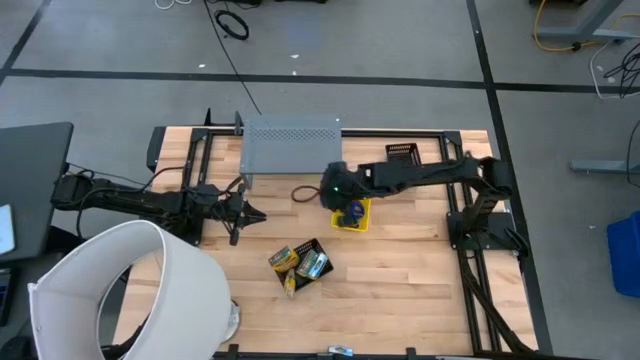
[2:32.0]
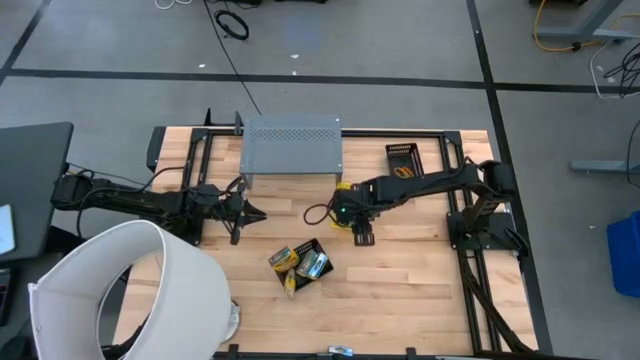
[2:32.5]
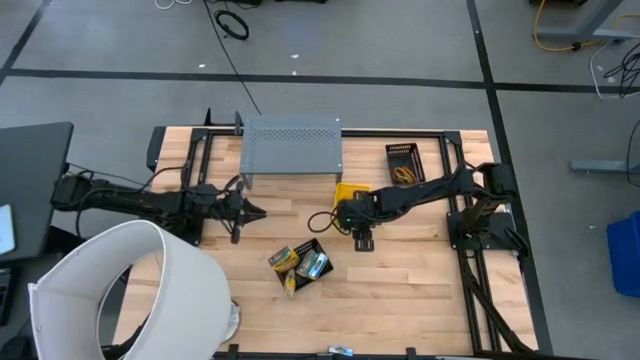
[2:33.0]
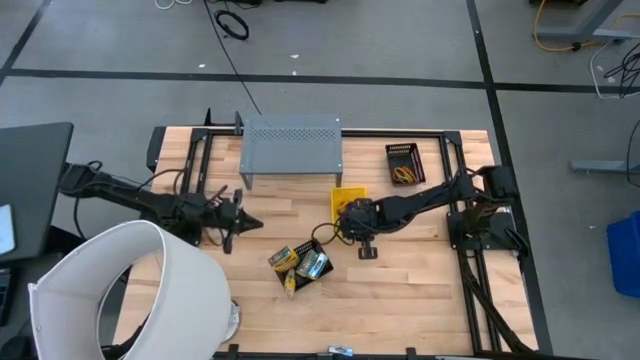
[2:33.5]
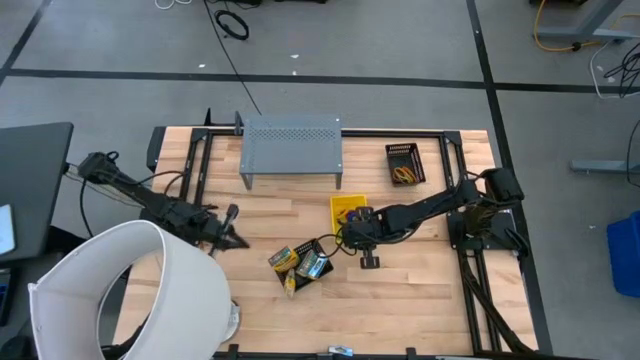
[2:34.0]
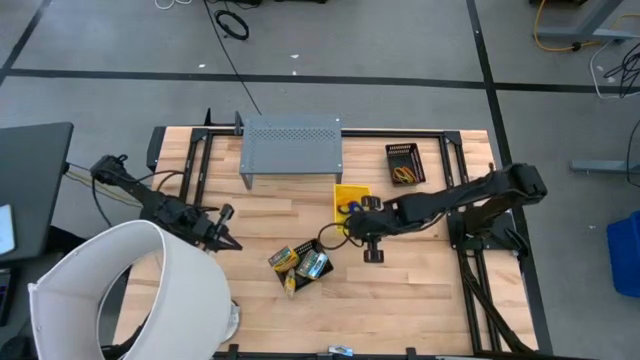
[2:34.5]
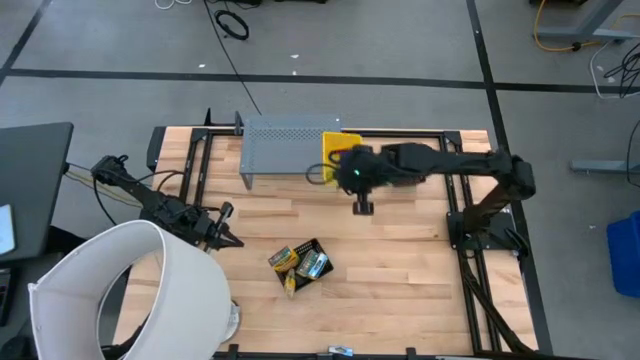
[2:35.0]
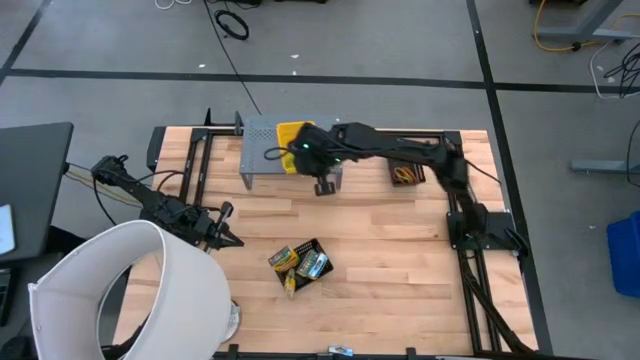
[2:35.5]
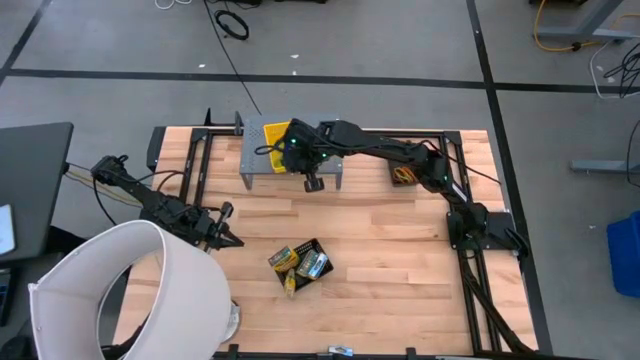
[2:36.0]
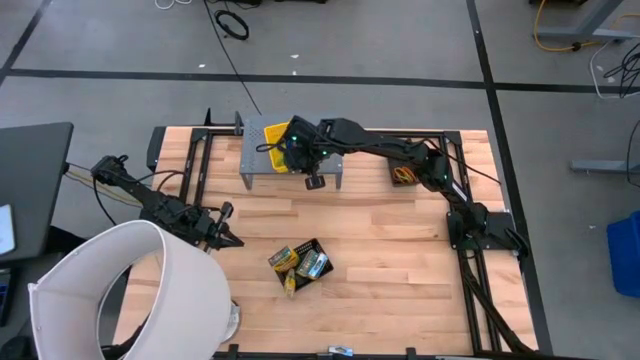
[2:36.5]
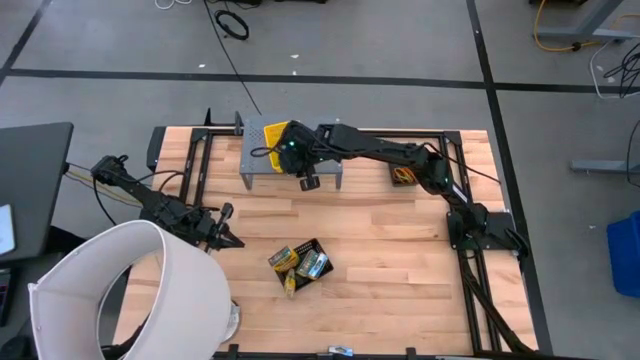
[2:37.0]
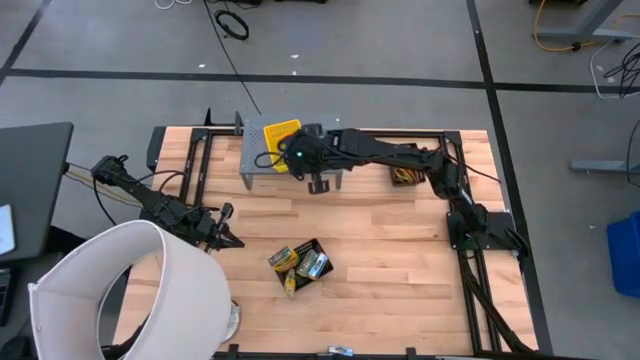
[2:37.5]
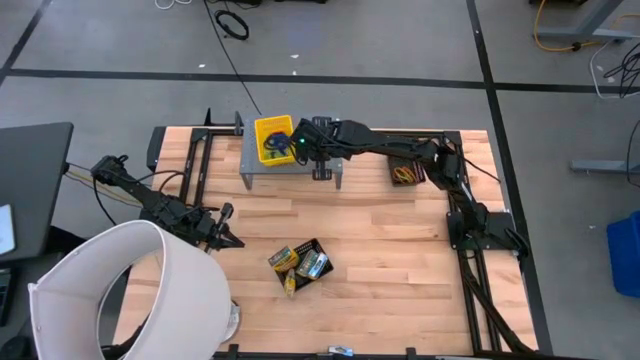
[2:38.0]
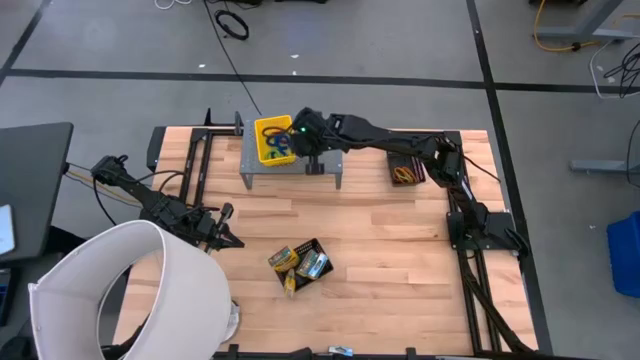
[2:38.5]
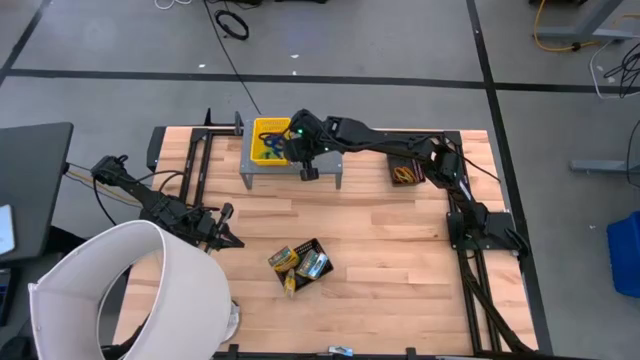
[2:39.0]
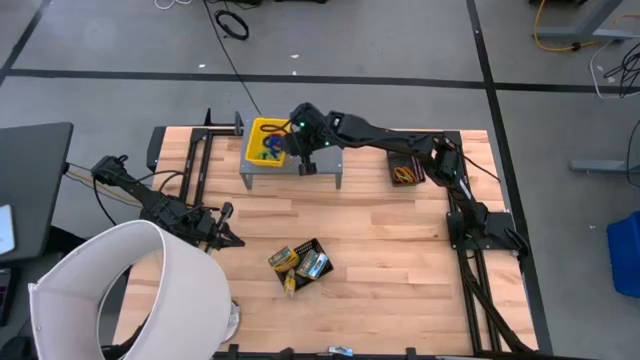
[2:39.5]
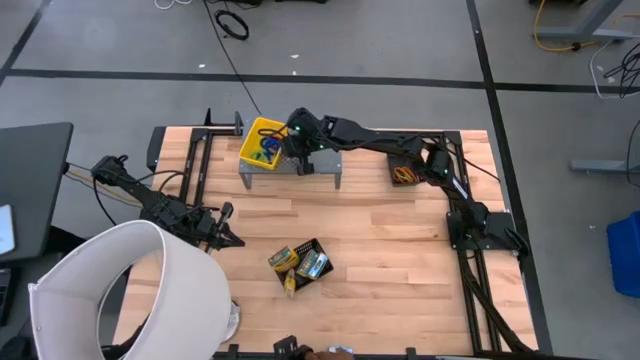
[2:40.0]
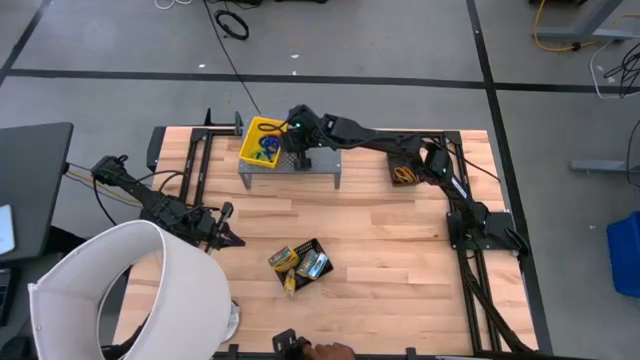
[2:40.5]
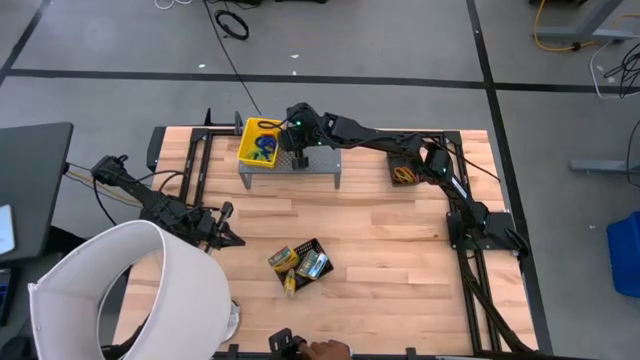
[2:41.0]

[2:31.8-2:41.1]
Task: Pick & Place Office Desk Supplies
Put the yellow bin on the shelf

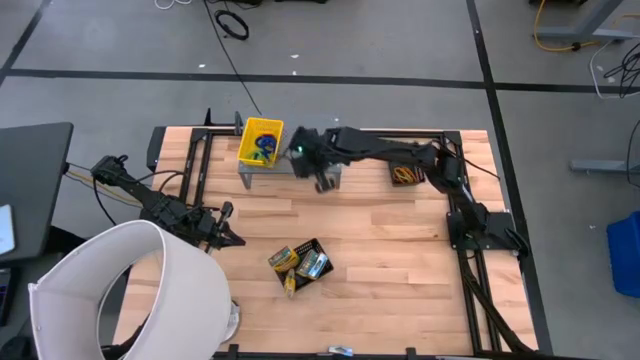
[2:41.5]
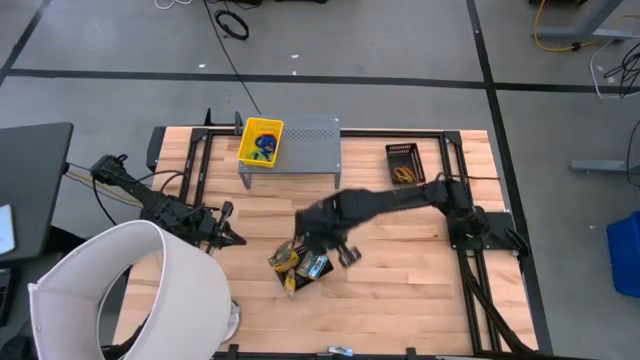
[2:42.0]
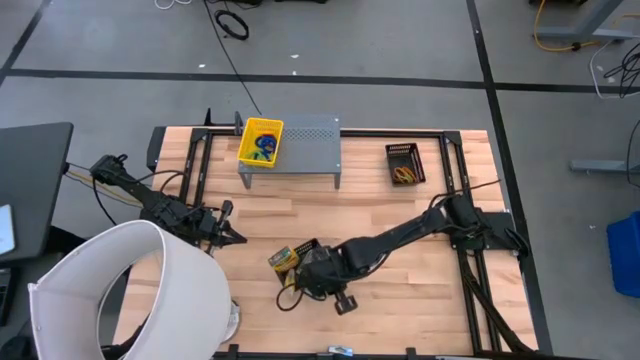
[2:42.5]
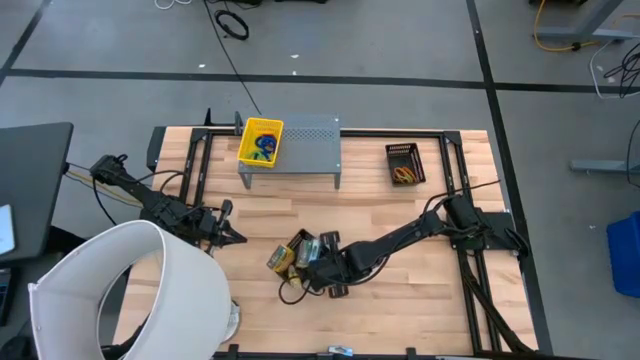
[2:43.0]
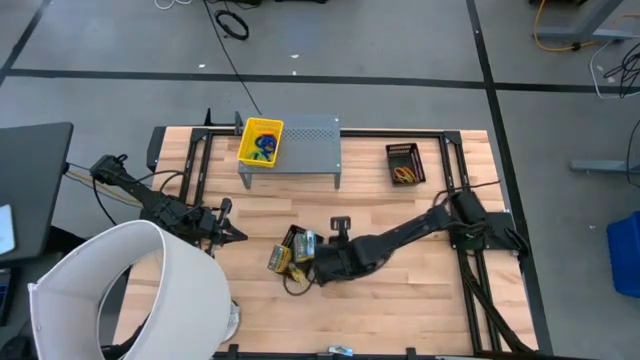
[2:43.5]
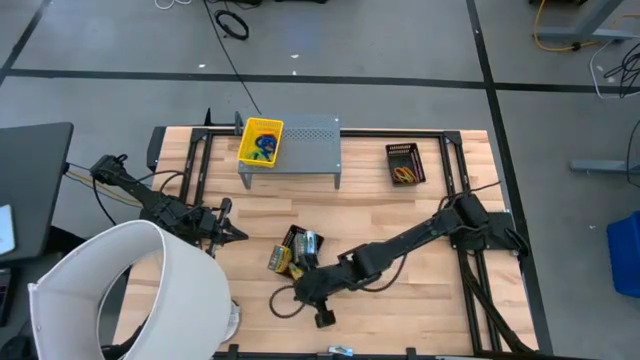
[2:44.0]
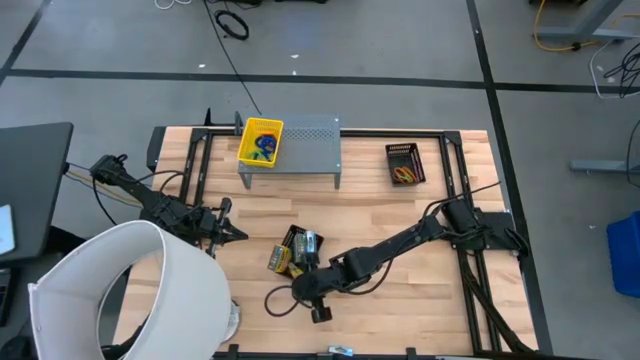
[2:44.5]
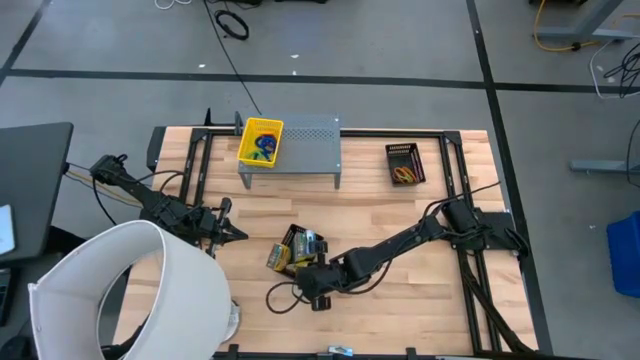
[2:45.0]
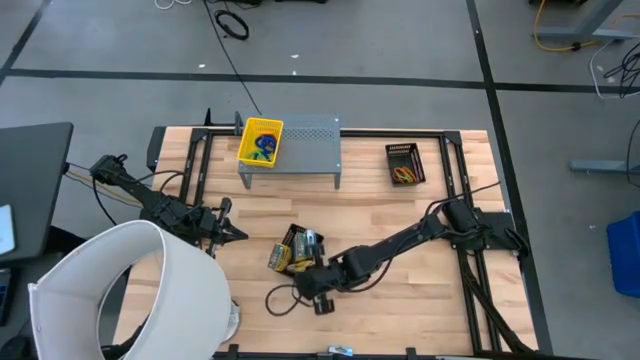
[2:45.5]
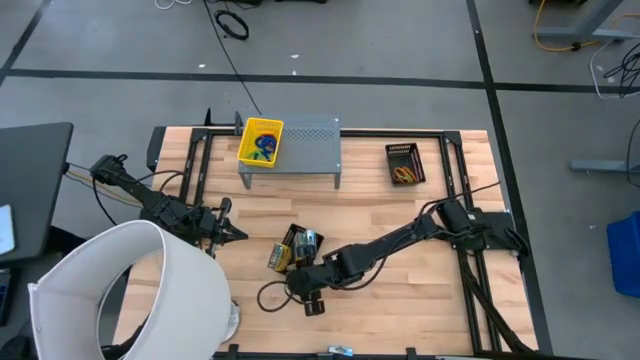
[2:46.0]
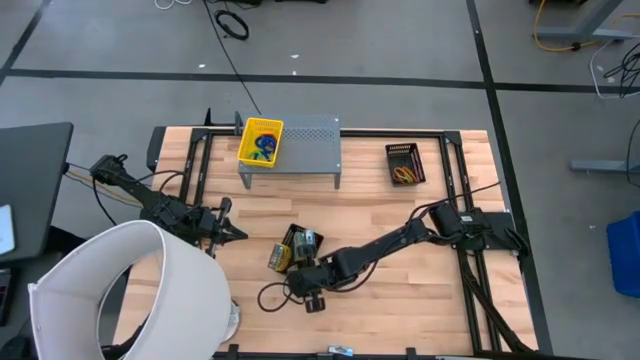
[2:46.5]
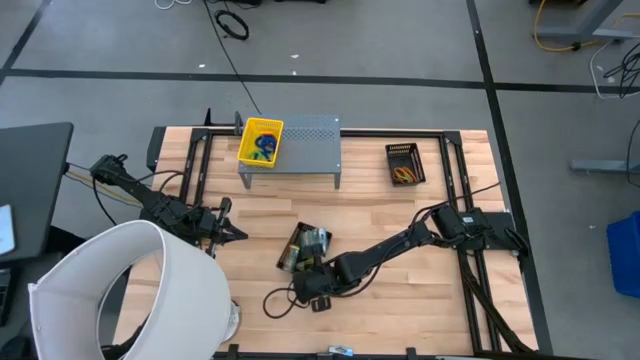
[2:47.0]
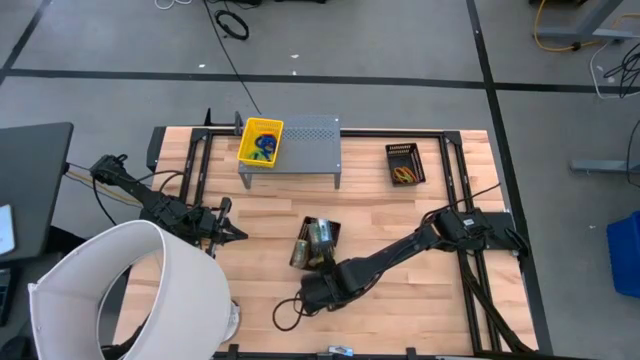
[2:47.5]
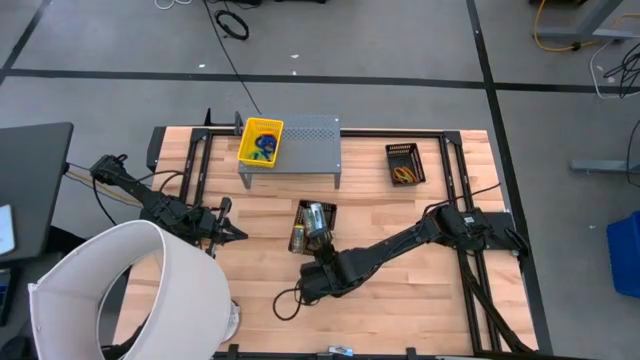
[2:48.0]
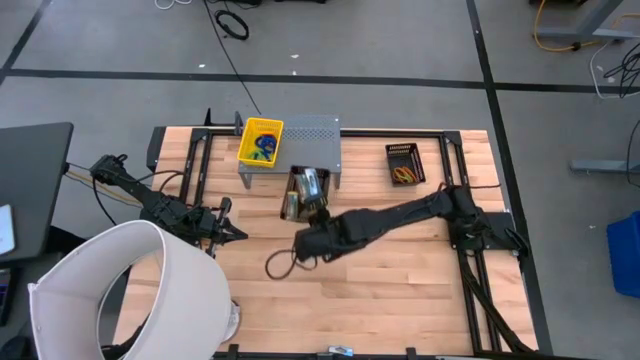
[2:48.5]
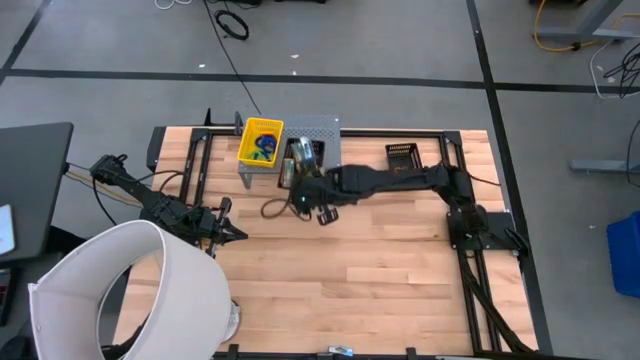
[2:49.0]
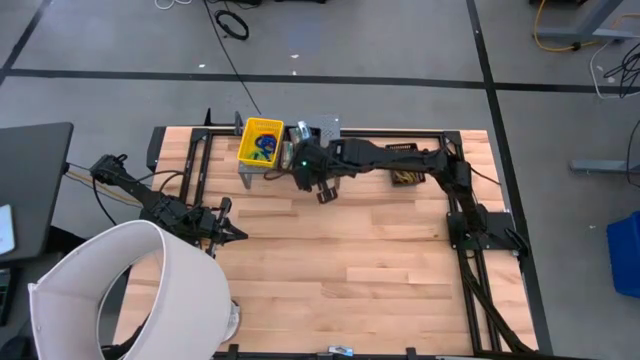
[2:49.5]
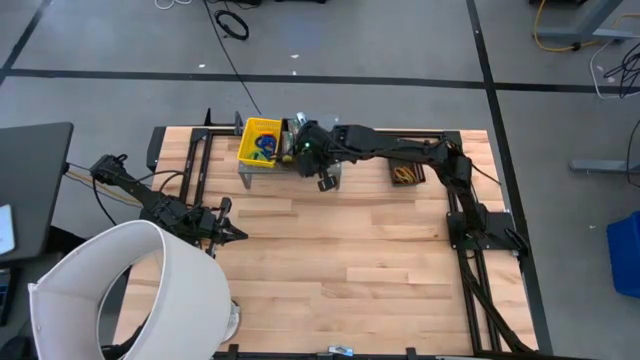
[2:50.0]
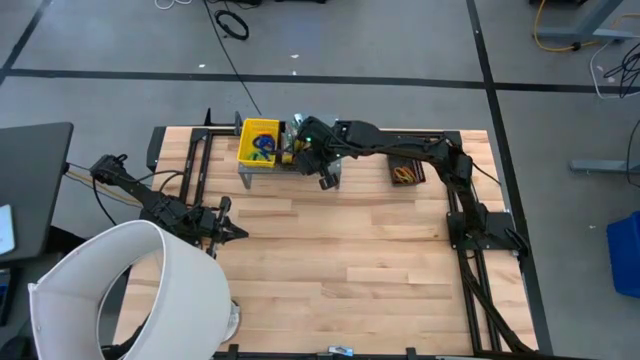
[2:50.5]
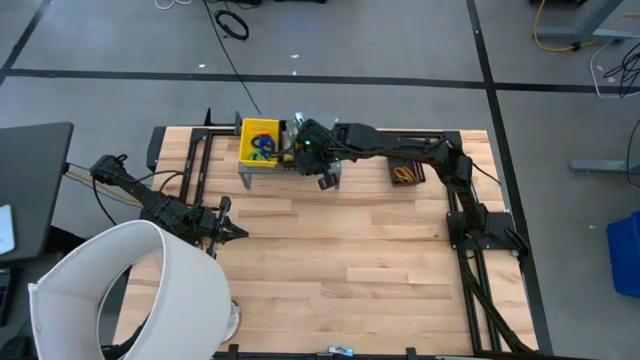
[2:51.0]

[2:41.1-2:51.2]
Put the bottom black bin on the shelf

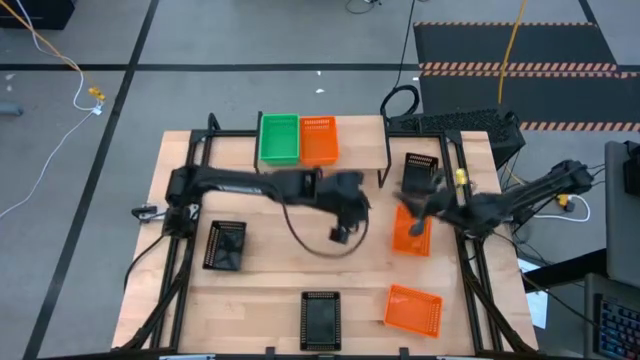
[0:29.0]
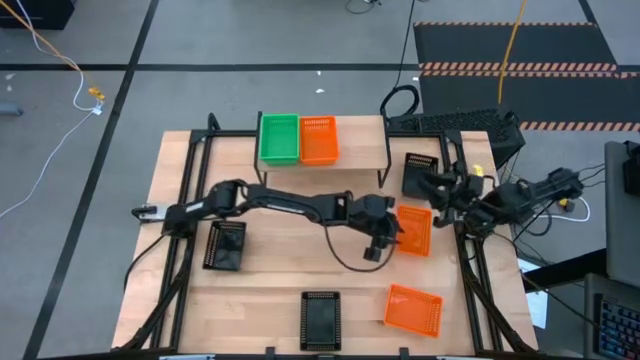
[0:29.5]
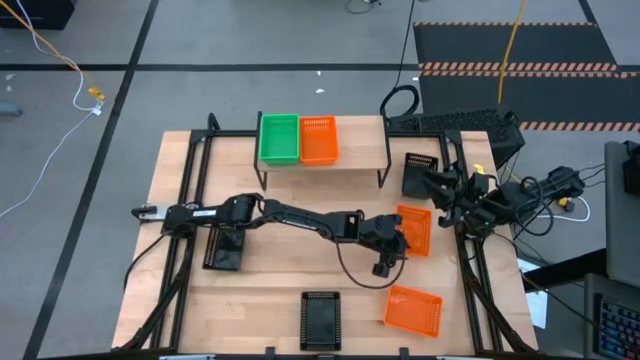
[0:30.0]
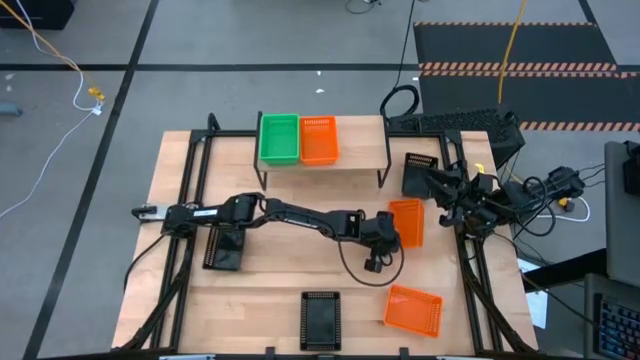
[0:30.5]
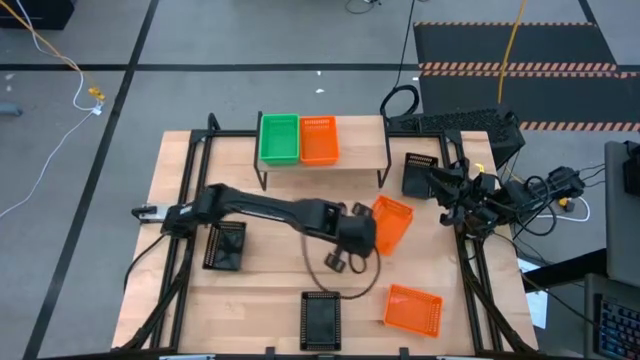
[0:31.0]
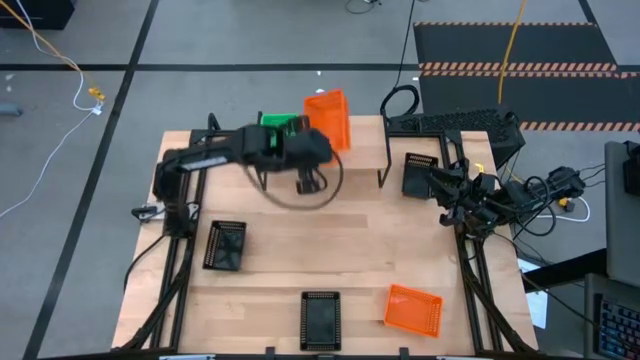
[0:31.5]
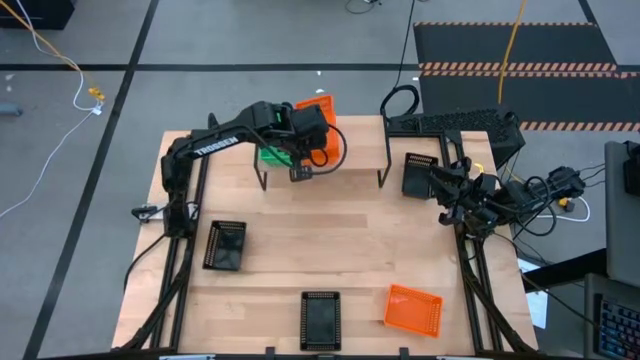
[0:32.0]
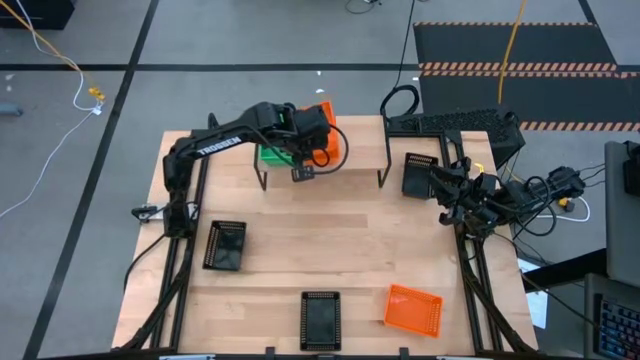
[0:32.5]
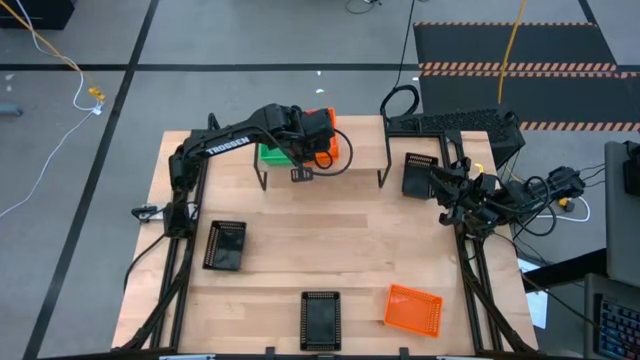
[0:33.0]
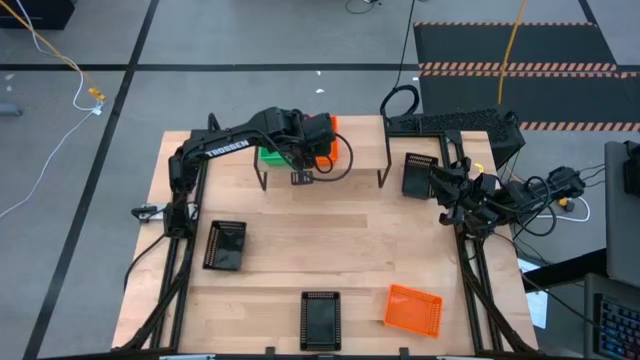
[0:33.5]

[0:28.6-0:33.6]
Task: Stack baskets on shelf by color
Stack the top orange bin on top of the orange bin on the shelf
